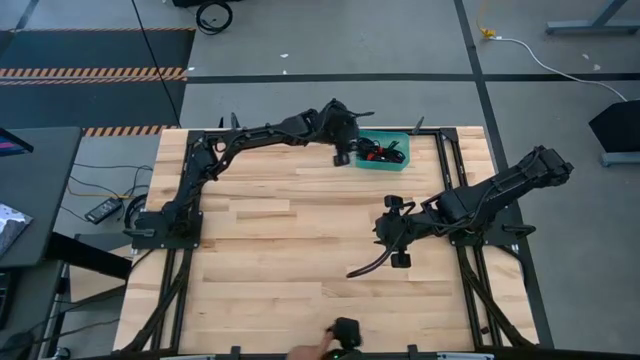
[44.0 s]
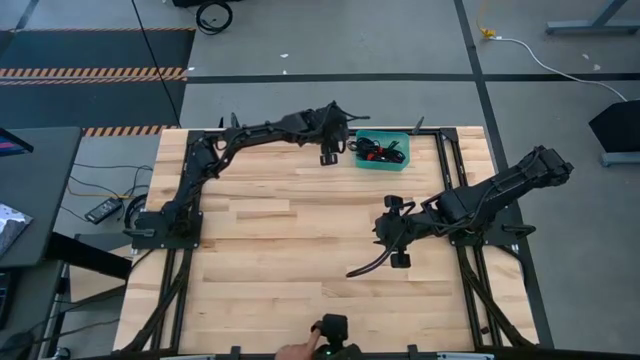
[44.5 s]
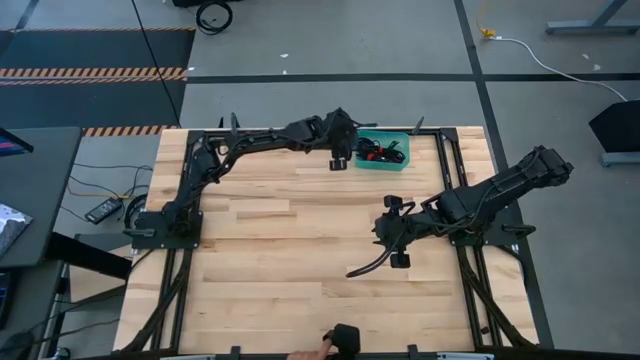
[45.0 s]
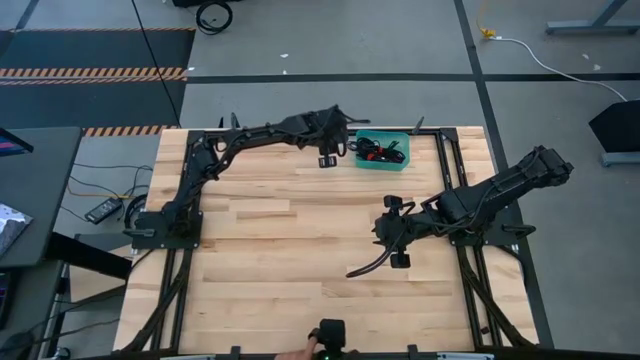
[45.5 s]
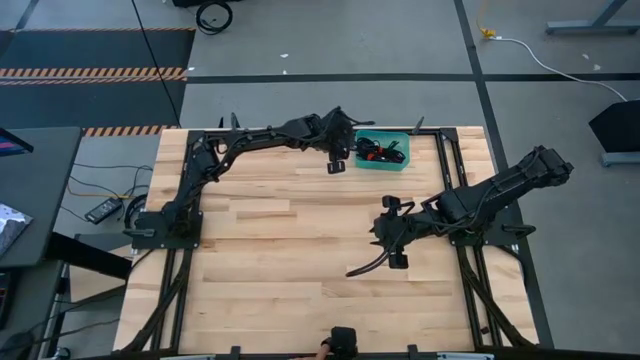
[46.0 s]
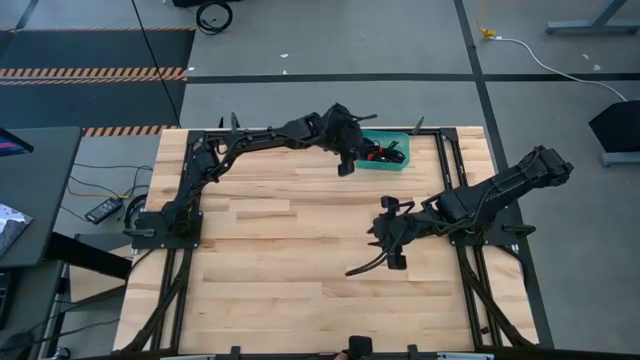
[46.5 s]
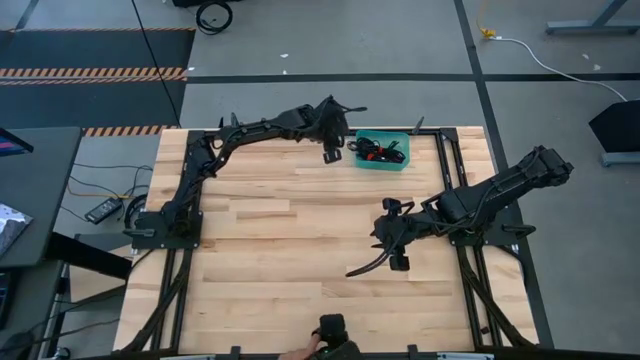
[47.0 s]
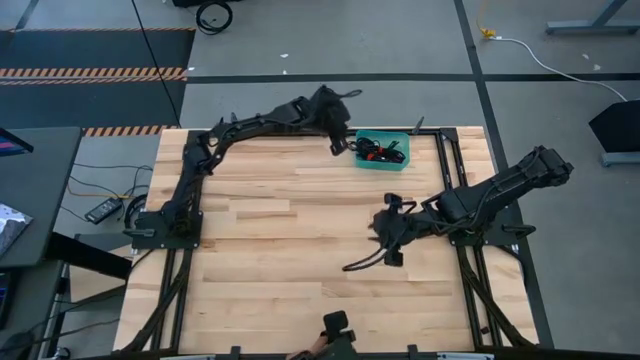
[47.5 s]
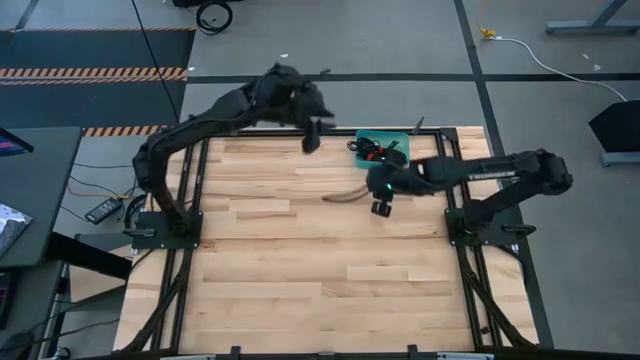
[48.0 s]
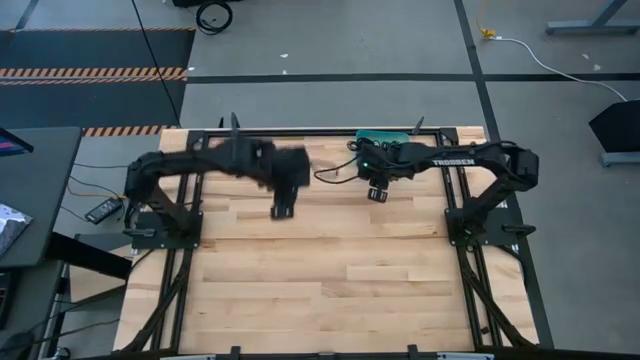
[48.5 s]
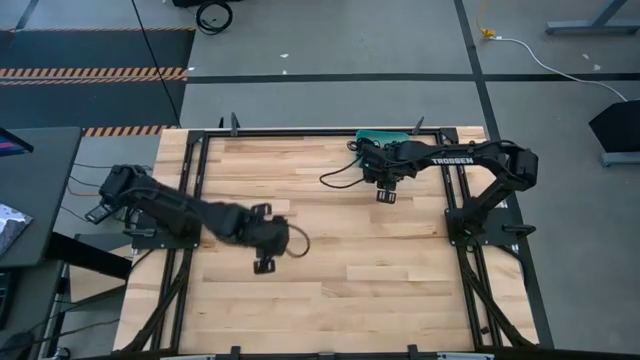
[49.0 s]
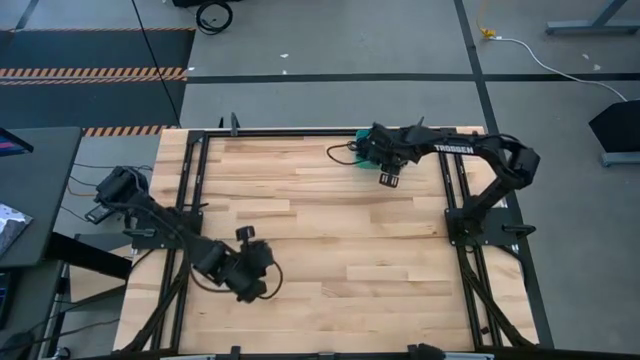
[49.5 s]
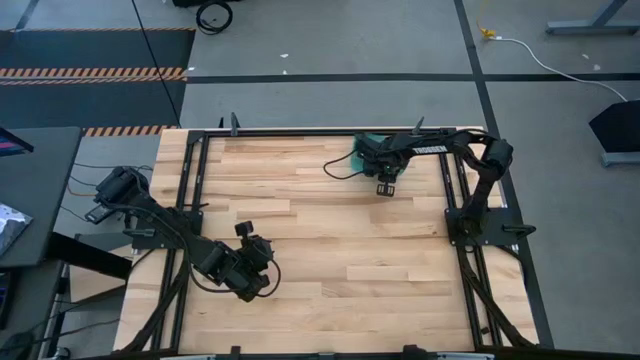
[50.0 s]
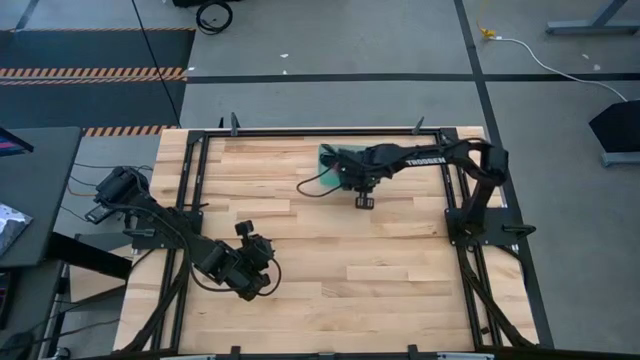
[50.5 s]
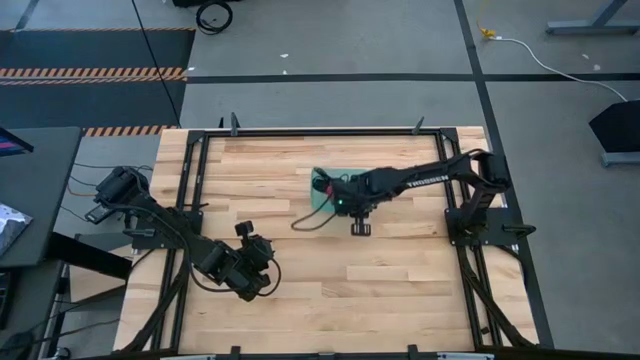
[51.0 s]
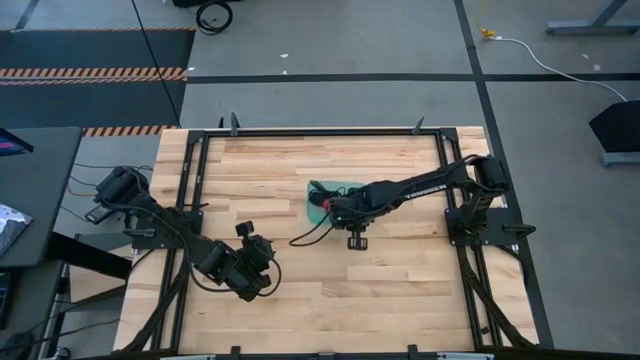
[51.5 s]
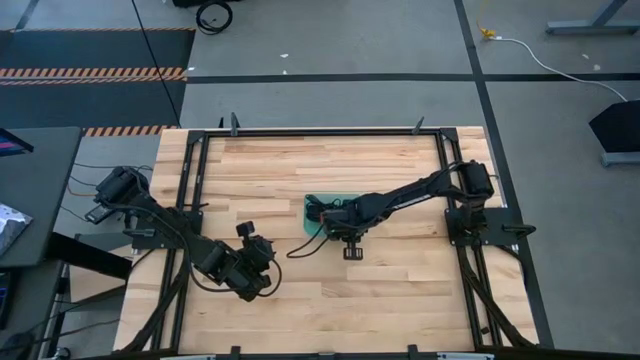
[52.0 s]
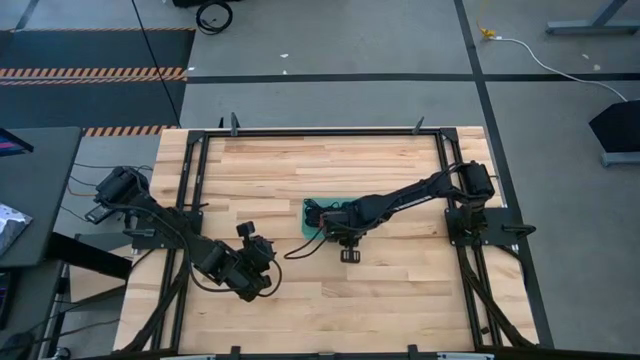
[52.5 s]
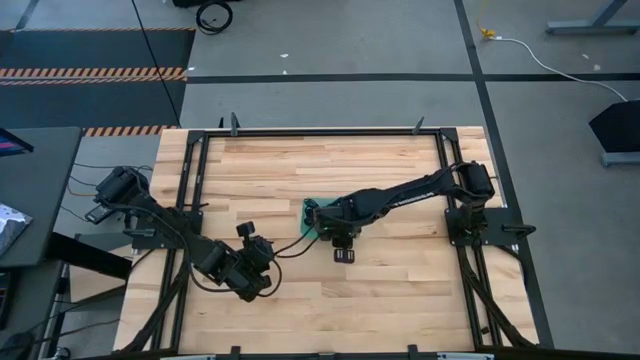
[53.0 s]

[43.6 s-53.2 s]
Task: Pick and place USB-C Cables
Move the bin to the center of the table

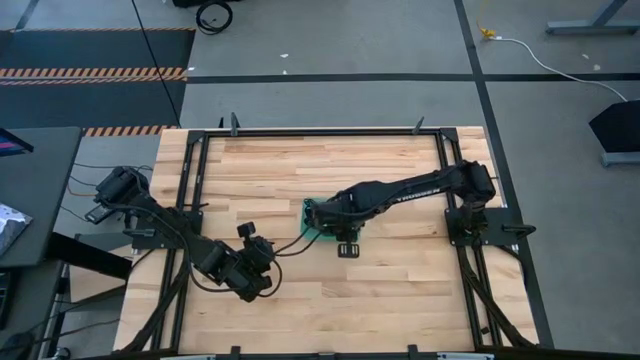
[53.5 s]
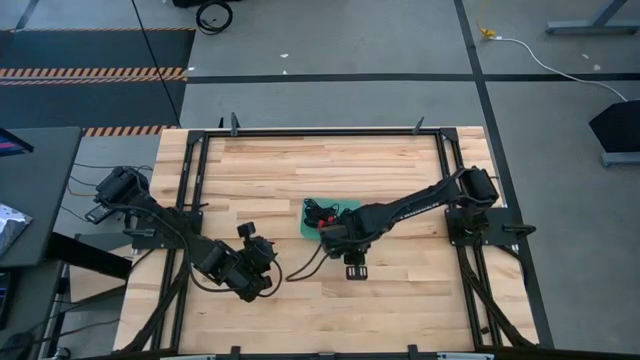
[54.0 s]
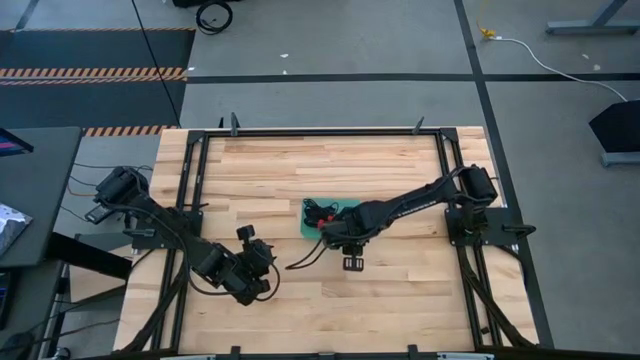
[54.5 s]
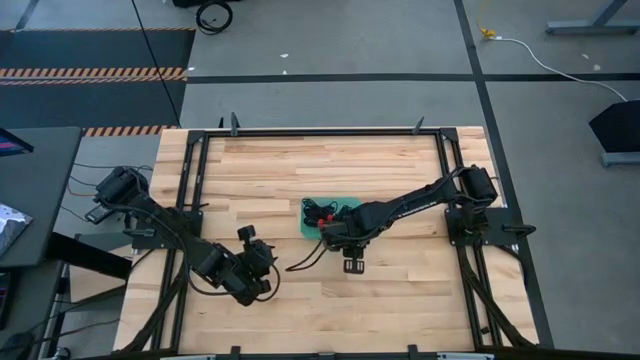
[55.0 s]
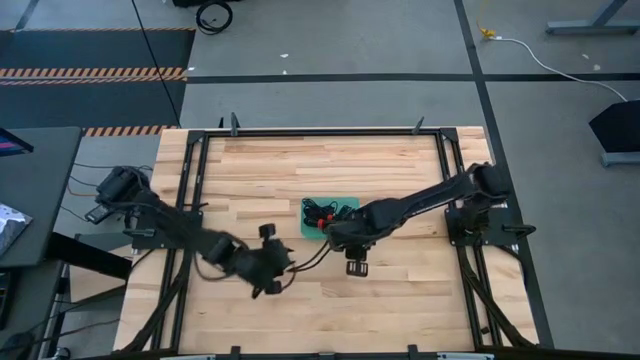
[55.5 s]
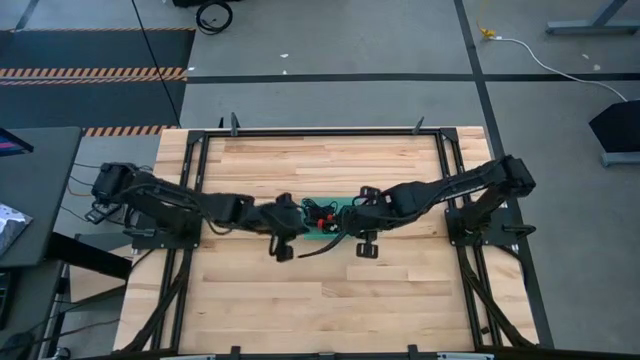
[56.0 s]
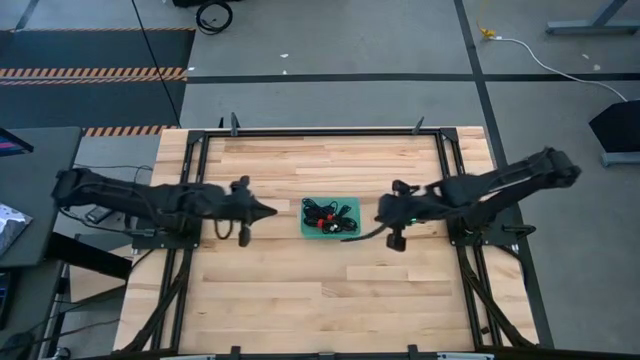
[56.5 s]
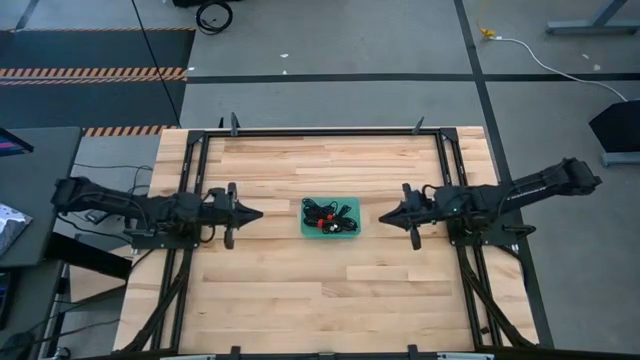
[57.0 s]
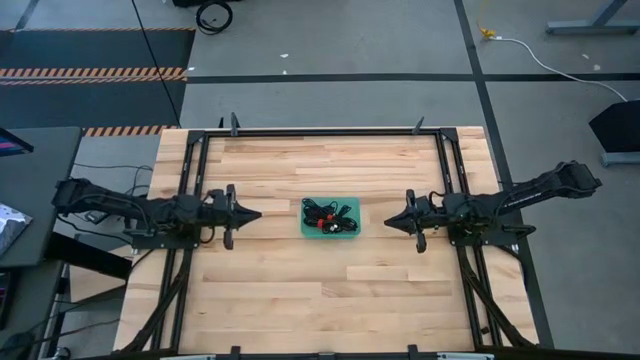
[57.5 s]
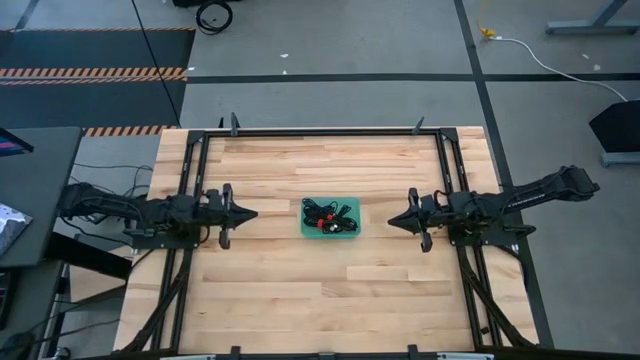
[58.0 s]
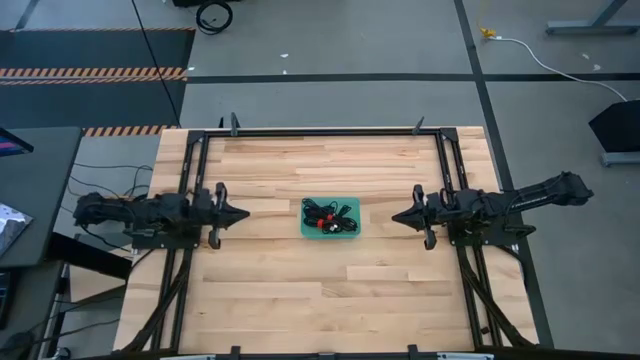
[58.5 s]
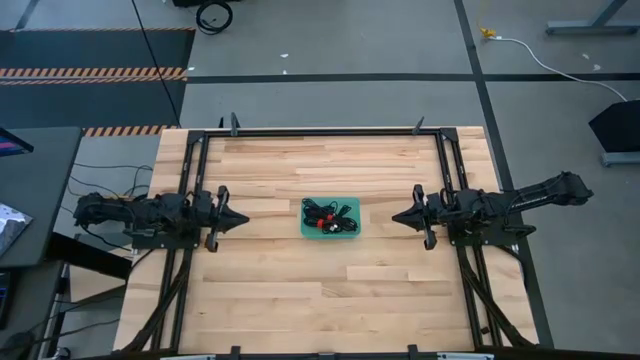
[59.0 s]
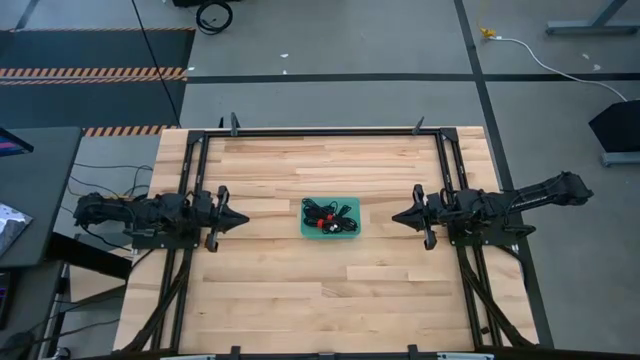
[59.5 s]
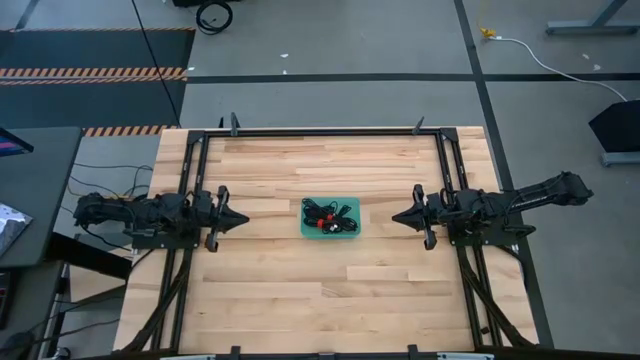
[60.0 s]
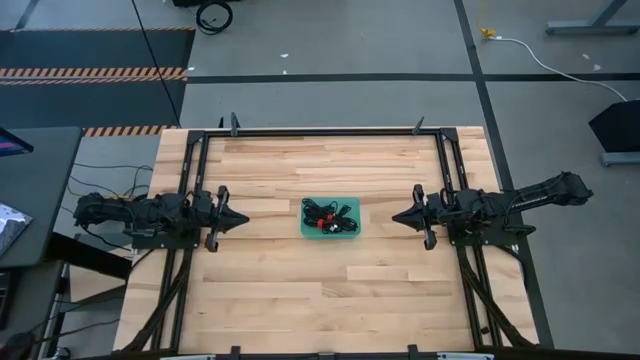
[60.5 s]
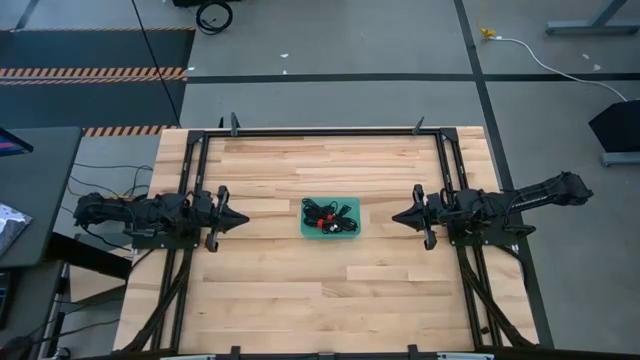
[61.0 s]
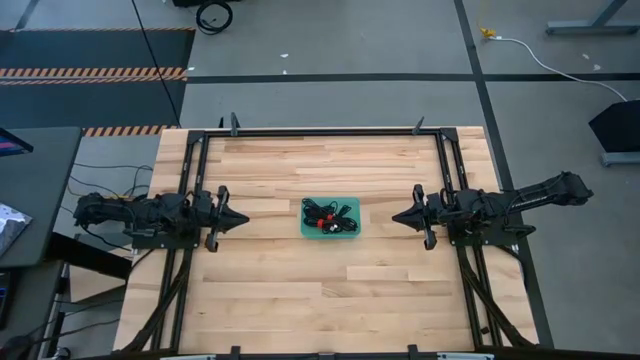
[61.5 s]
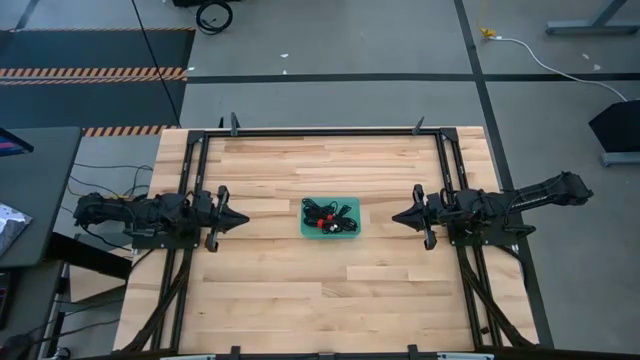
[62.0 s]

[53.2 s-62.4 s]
Return to Home Position

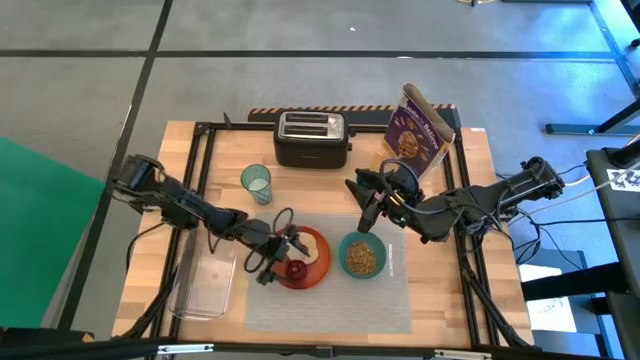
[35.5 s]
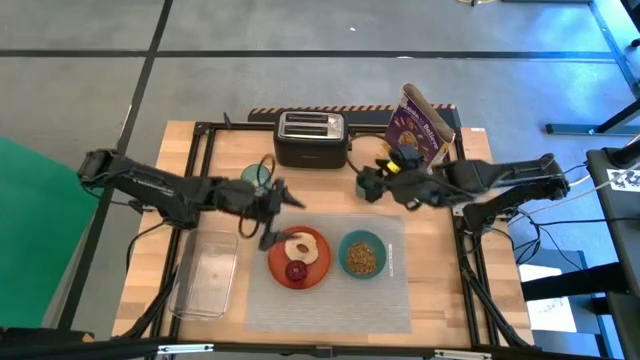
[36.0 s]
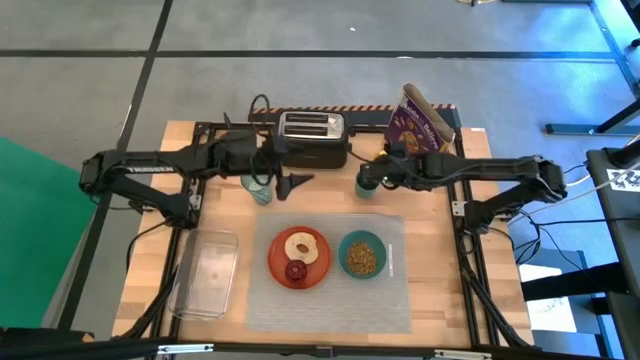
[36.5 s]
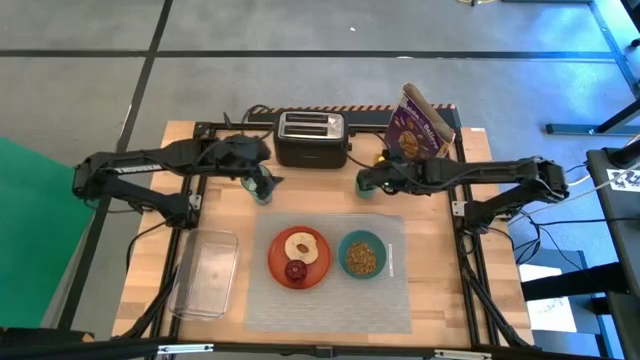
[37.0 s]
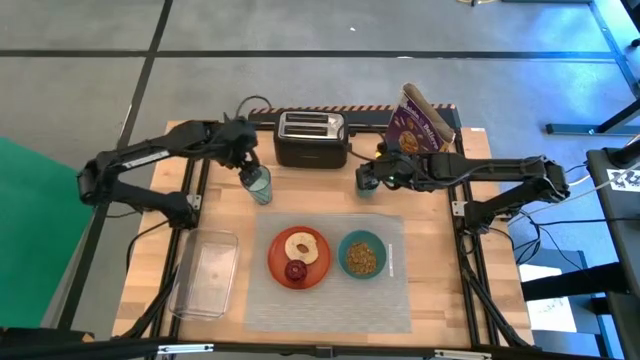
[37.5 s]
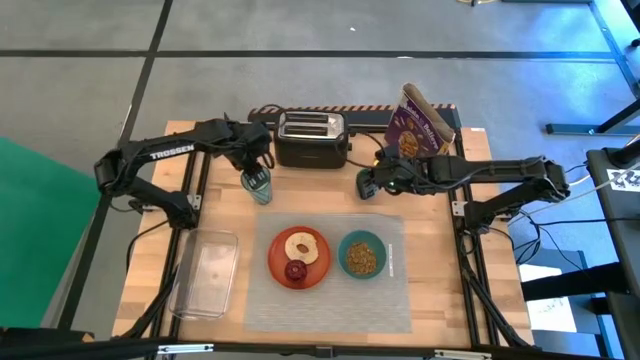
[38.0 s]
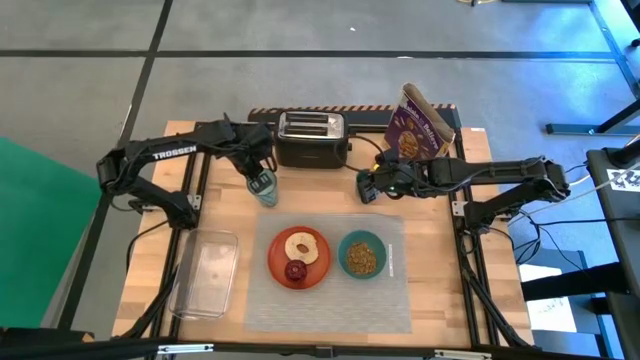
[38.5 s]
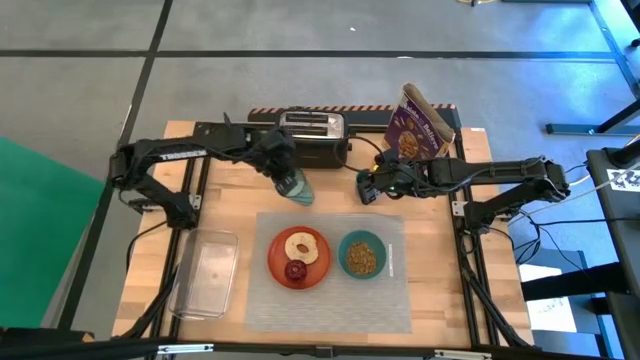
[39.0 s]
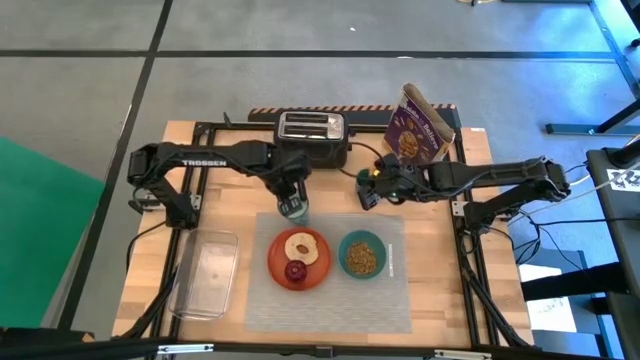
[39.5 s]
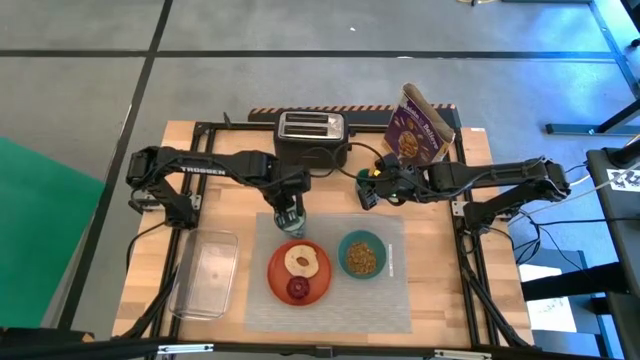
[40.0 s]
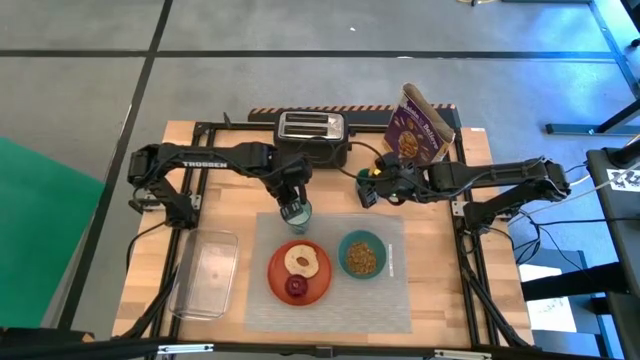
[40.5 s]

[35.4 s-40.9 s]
Task: Arrange a breakfast setting
Put the blue cup to the top of the orange plate on the gray table mat
